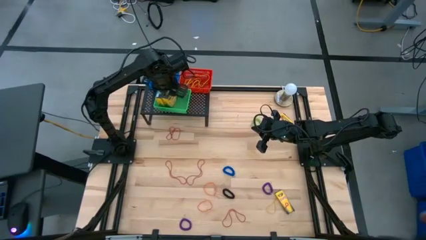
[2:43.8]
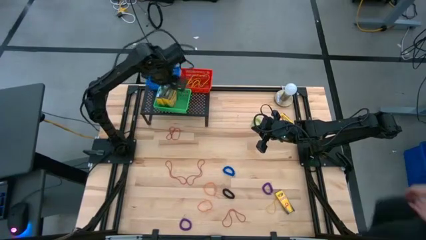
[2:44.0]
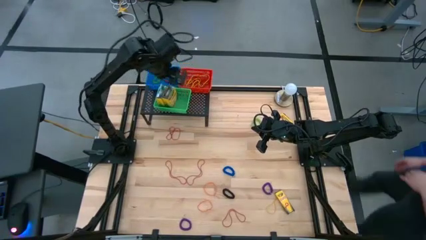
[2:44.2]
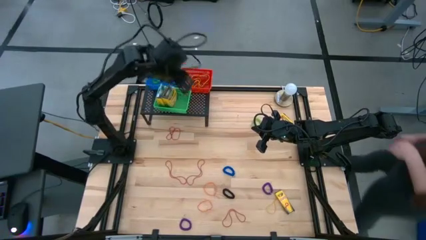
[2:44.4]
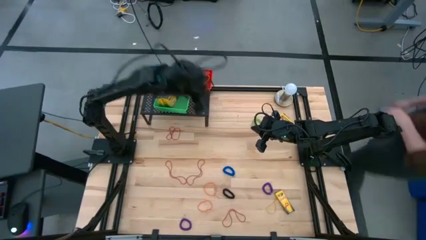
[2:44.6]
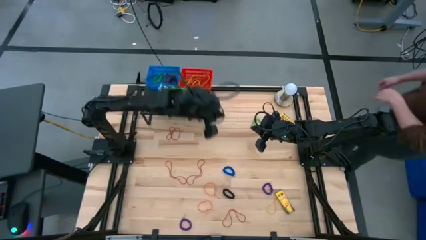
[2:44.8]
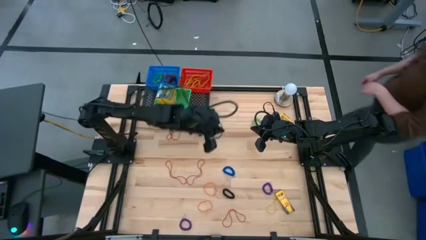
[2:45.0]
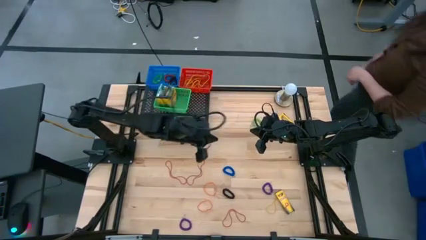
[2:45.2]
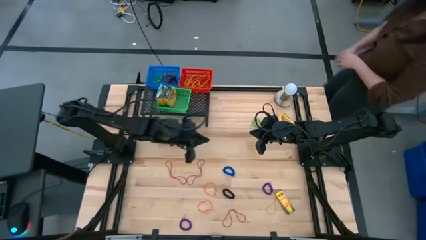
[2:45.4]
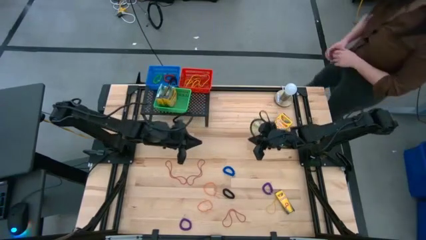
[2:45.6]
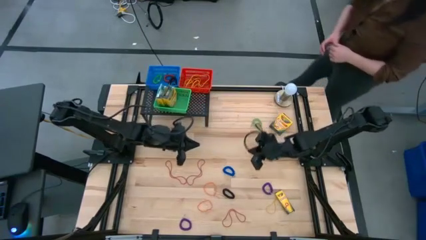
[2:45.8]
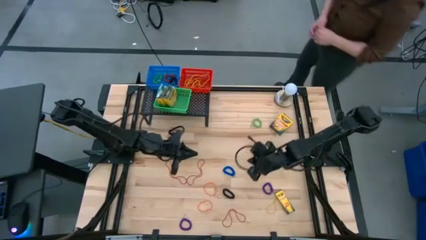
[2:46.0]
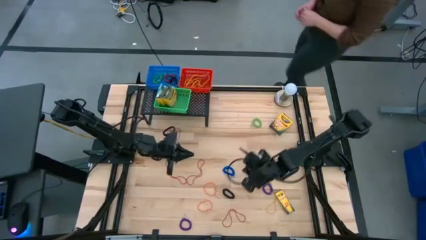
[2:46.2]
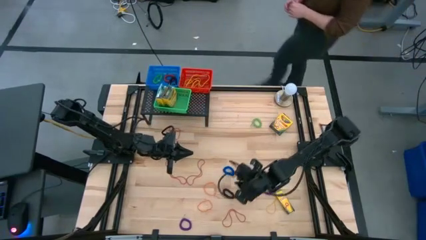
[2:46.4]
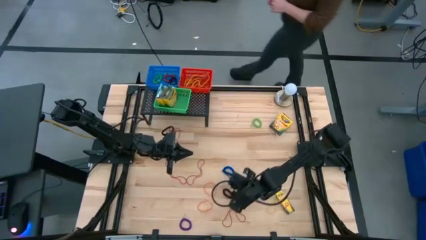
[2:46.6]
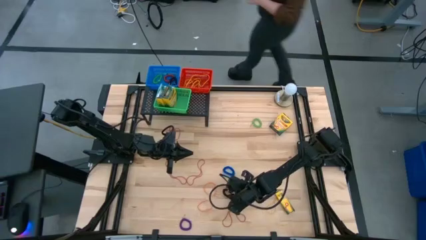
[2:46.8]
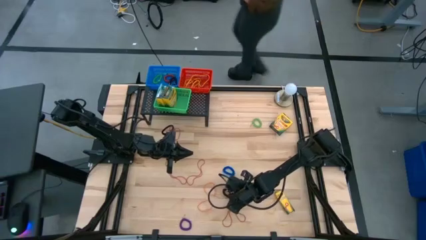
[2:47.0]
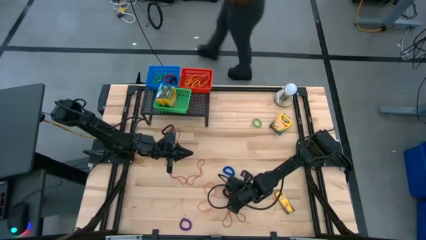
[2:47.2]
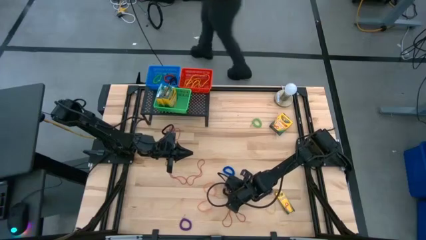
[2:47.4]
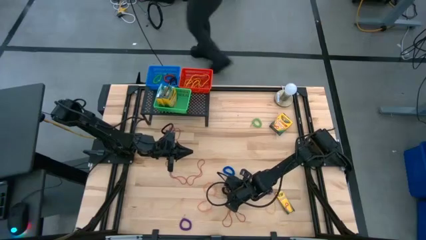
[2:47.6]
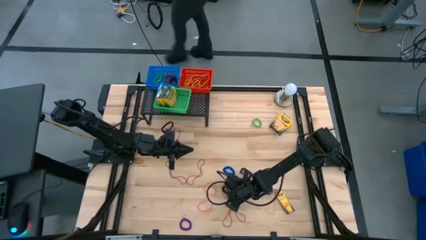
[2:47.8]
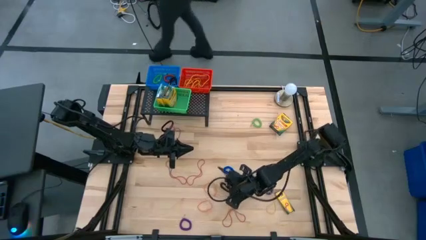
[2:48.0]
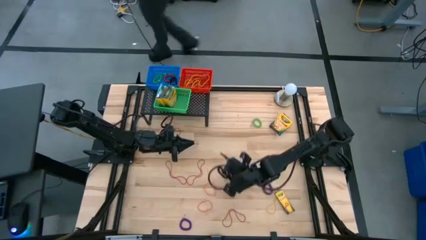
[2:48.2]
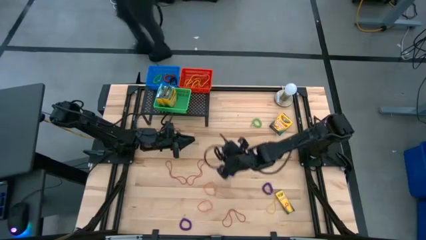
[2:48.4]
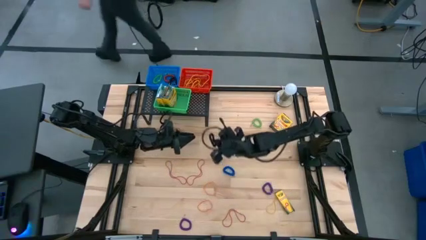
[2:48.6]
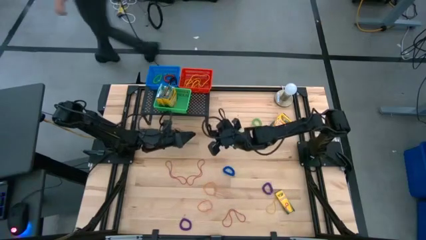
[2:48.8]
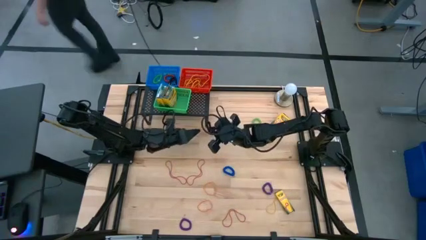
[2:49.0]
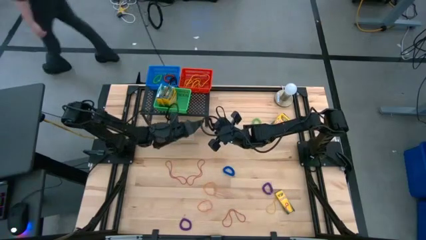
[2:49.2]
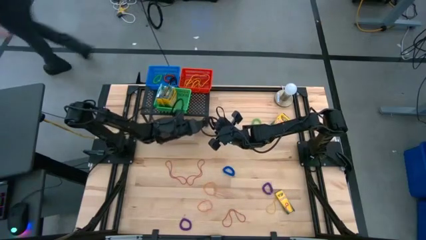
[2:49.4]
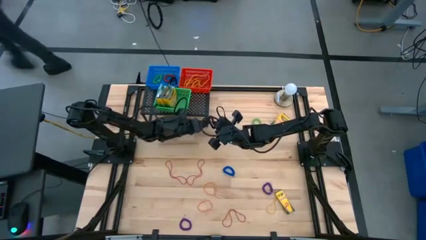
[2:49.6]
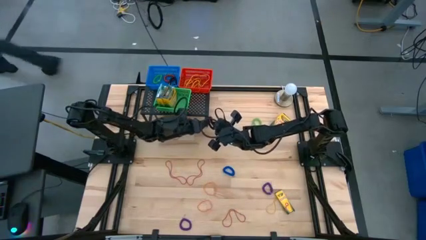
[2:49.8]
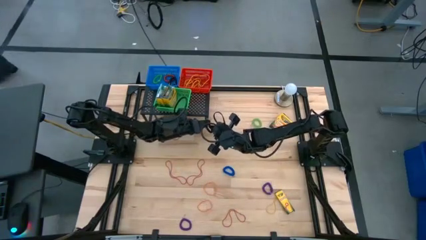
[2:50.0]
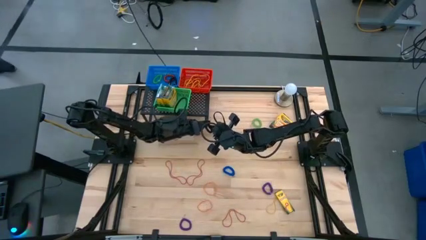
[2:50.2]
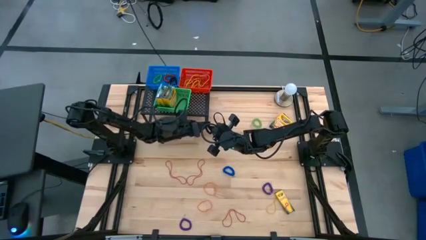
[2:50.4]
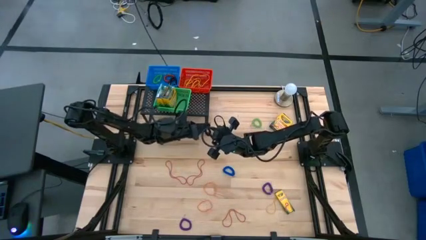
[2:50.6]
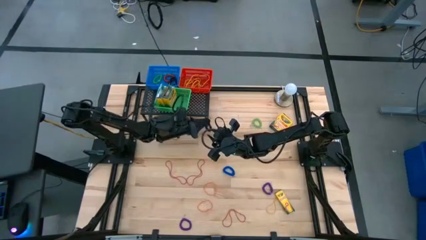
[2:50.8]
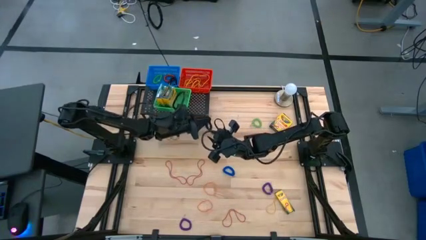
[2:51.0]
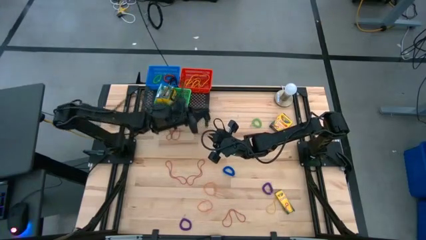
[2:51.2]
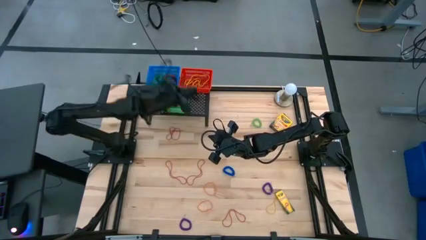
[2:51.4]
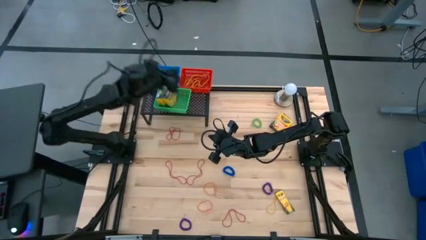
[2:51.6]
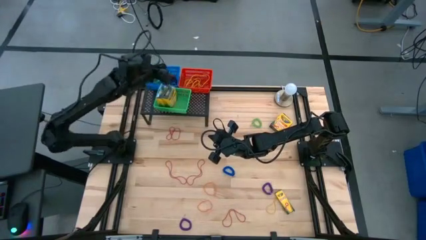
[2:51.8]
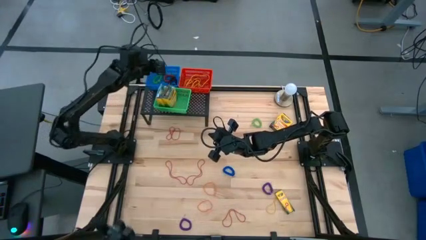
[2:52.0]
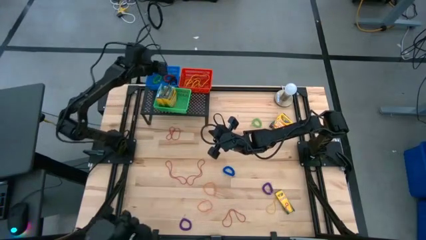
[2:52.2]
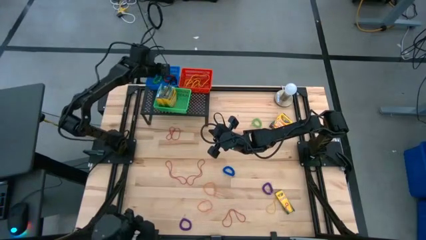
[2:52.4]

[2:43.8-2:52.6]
Task: Pick & Place Office Desk Supplies
Put the black spring keychain into the blue bin

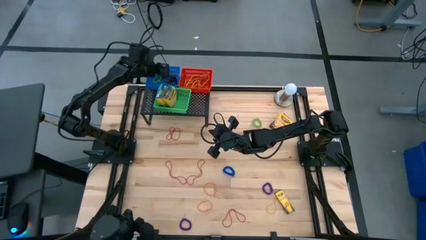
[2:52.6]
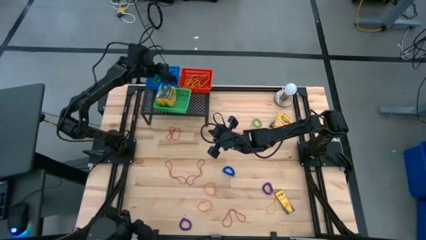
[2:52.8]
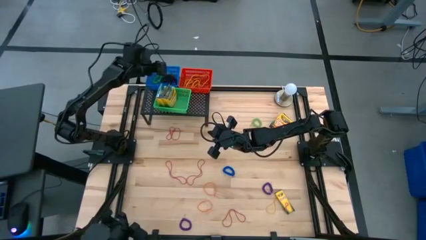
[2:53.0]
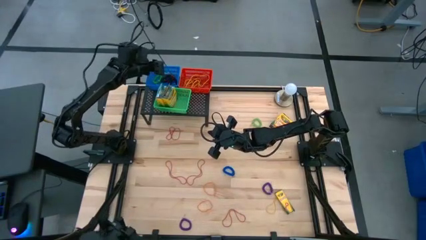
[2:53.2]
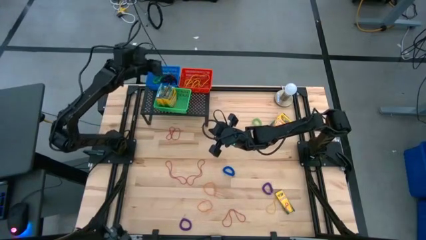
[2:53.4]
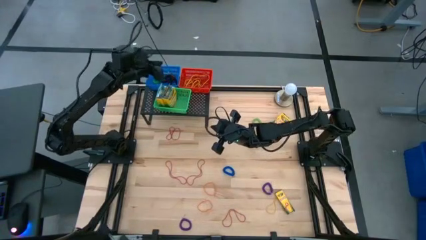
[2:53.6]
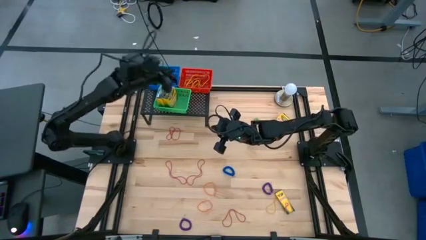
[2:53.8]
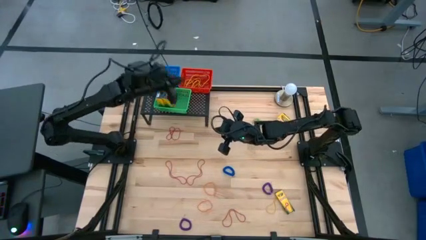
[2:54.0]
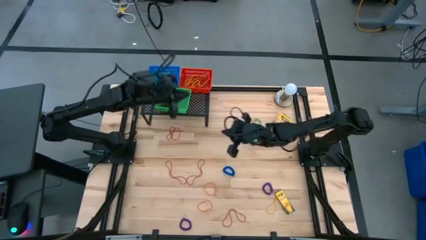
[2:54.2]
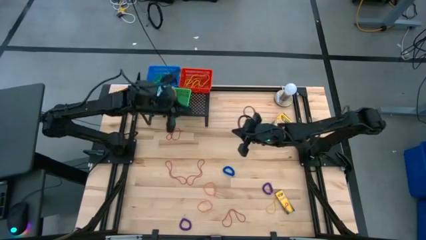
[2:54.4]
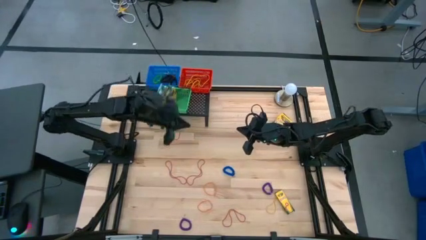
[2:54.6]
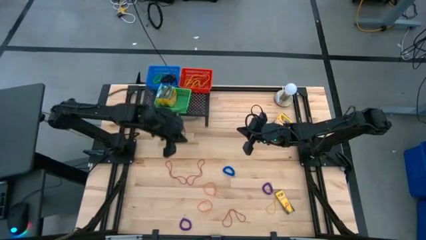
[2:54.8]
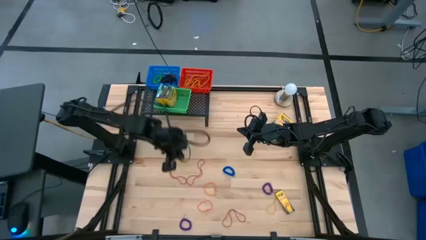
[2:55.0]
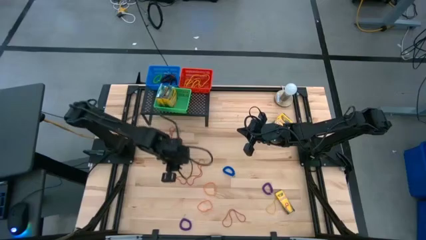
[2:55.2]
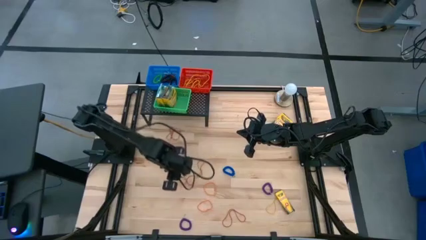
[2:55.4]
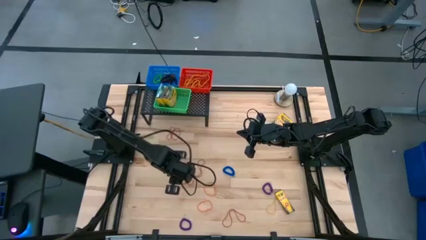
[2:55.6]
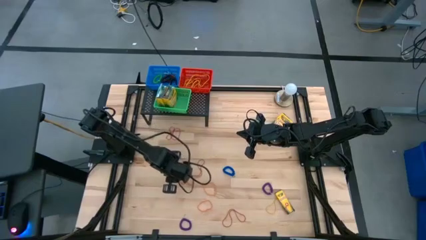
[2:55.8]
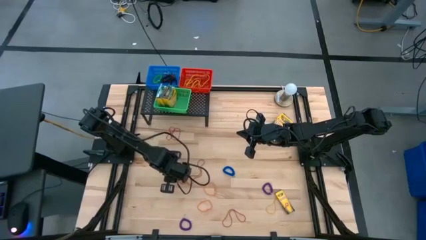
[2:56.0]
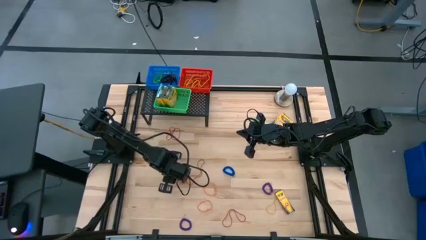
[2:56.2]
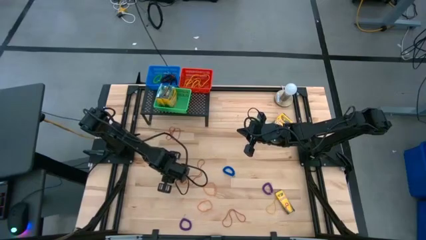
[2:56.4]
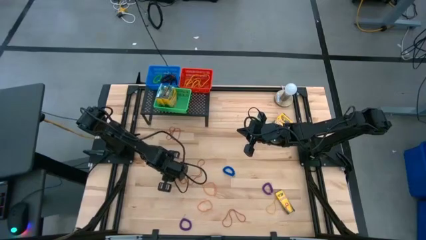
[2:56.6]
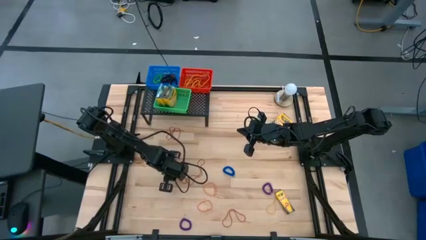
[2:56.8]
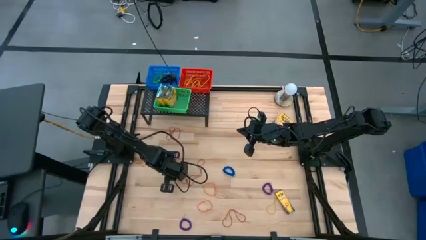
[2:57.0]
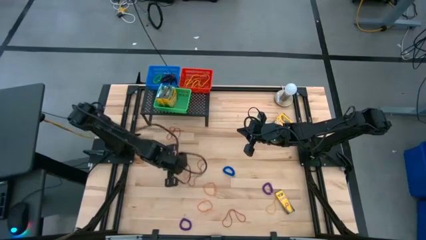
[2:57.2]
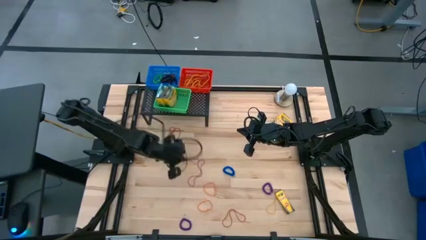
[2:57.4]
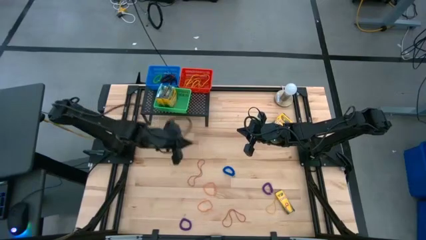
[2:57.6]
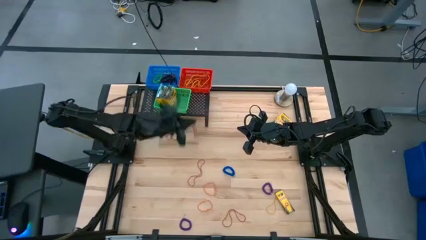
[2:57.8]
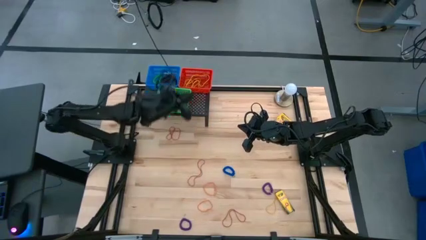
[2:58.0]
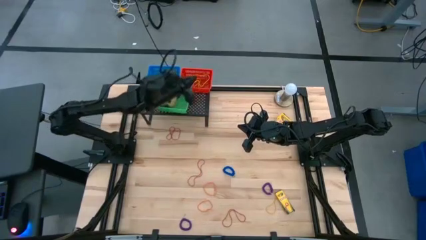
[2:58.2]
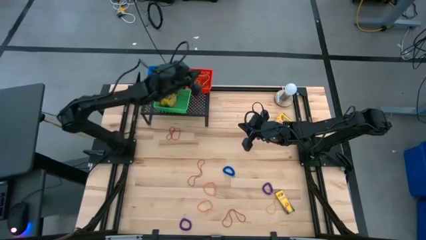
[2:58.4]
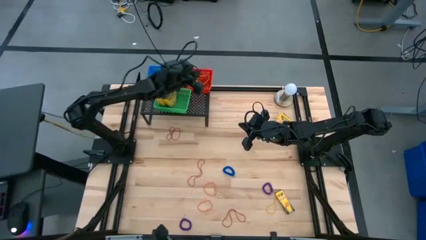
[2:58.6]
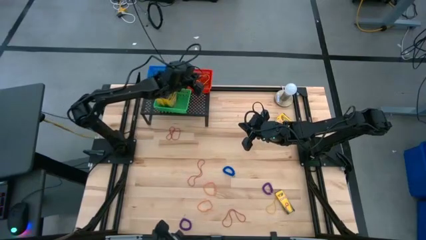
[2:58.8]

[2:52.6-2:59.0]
Put the red rubber band into the red bin
